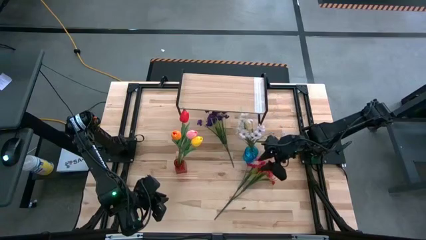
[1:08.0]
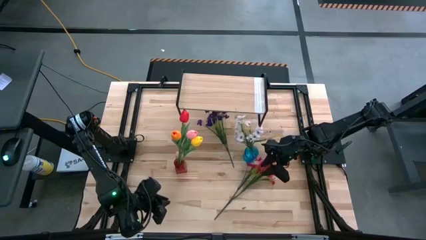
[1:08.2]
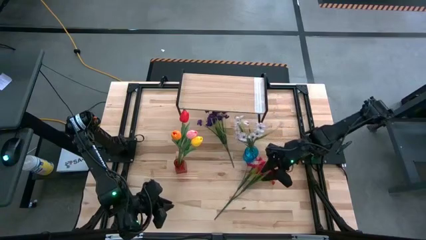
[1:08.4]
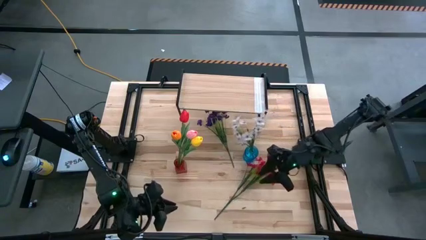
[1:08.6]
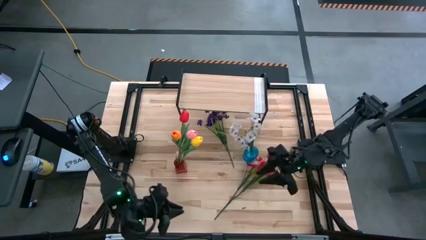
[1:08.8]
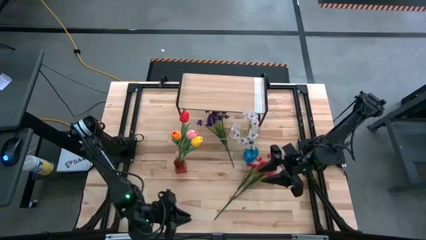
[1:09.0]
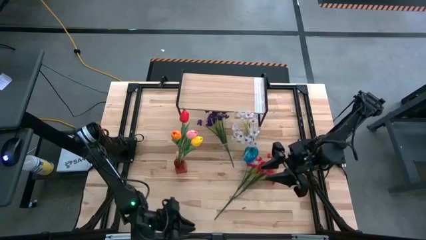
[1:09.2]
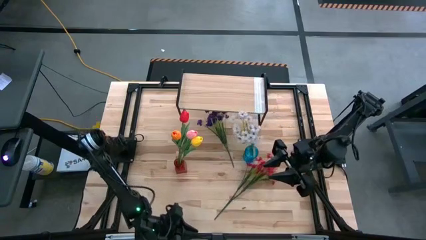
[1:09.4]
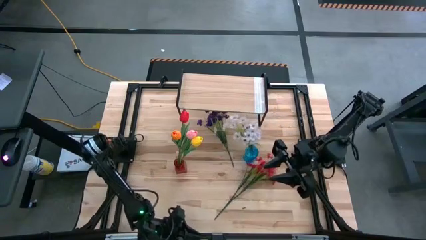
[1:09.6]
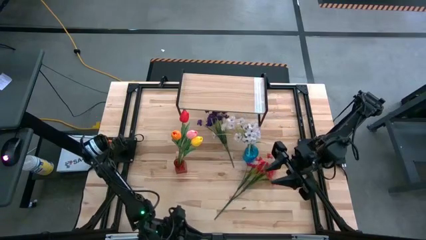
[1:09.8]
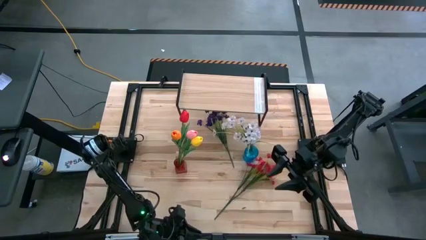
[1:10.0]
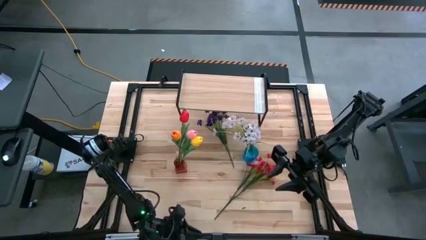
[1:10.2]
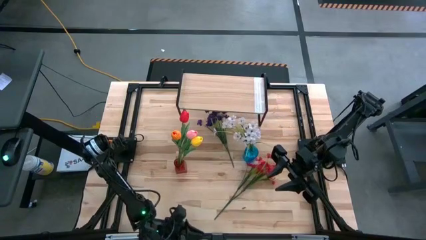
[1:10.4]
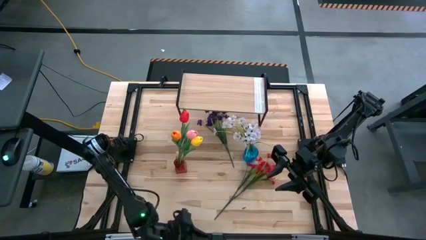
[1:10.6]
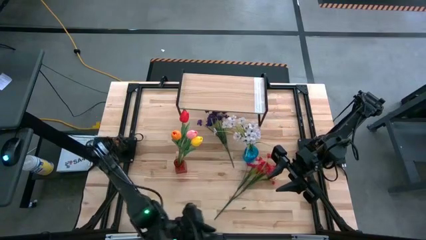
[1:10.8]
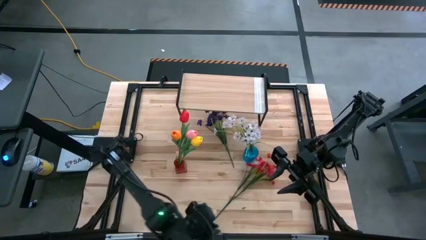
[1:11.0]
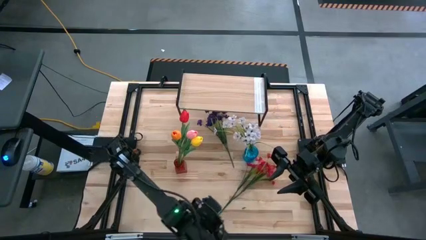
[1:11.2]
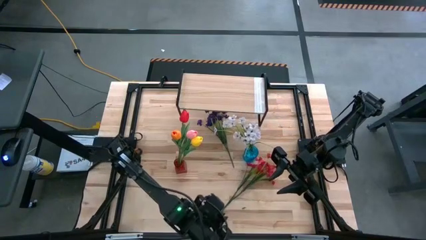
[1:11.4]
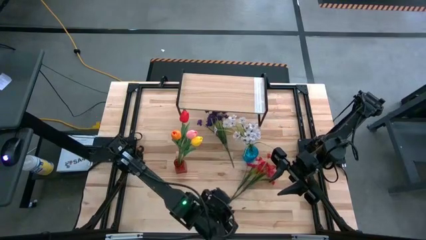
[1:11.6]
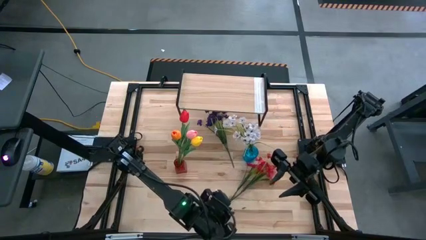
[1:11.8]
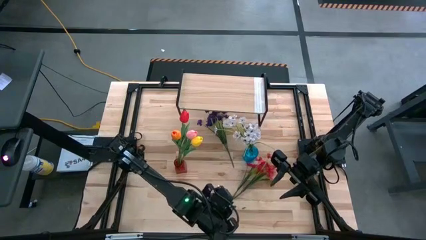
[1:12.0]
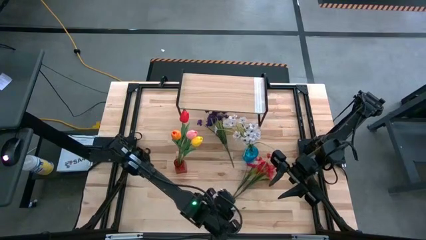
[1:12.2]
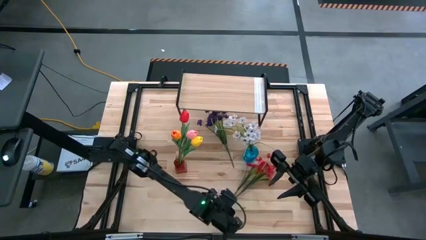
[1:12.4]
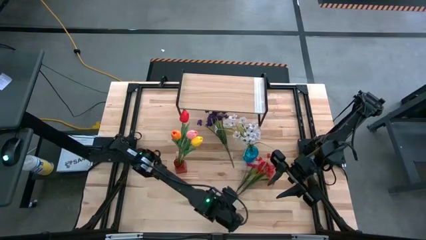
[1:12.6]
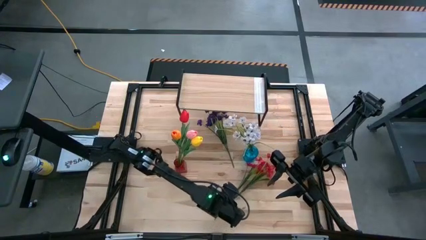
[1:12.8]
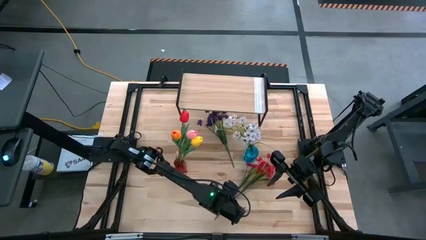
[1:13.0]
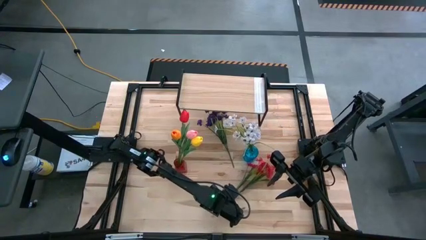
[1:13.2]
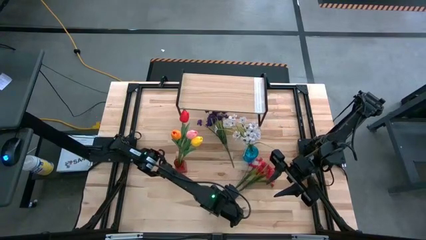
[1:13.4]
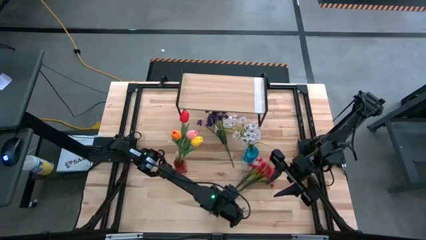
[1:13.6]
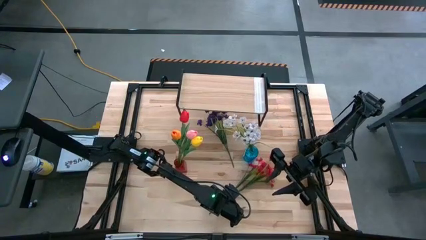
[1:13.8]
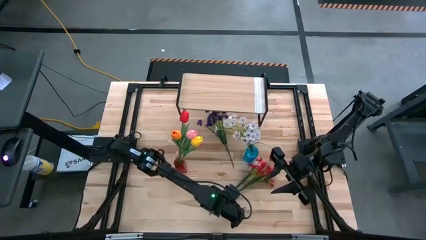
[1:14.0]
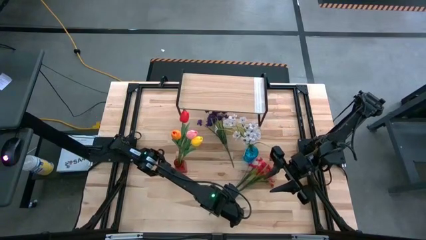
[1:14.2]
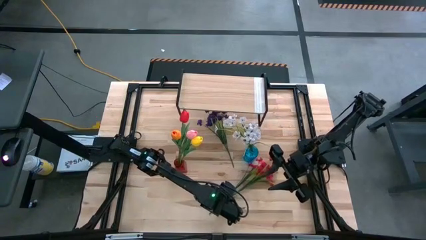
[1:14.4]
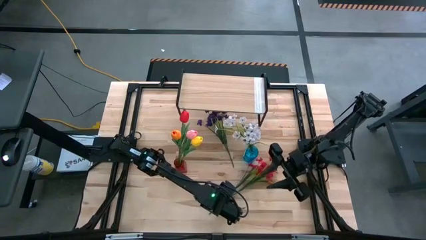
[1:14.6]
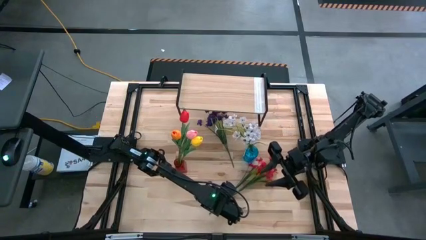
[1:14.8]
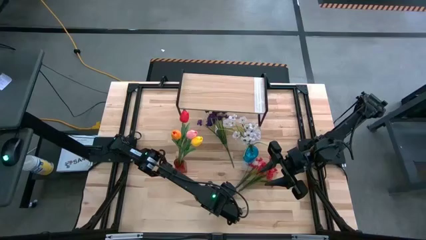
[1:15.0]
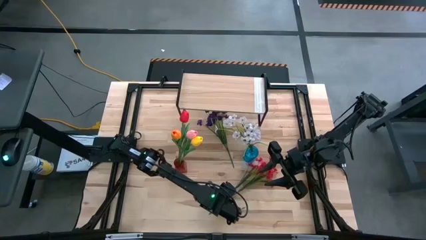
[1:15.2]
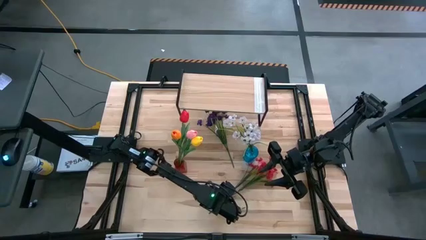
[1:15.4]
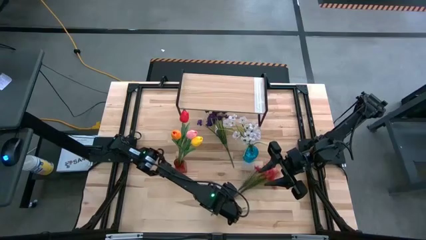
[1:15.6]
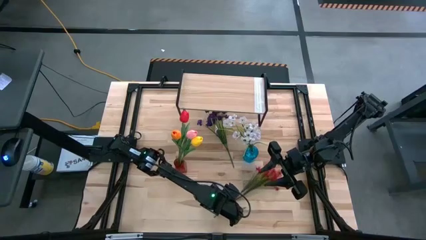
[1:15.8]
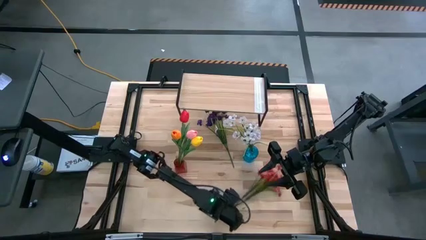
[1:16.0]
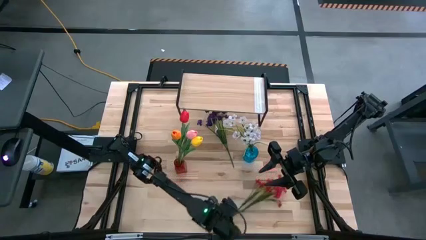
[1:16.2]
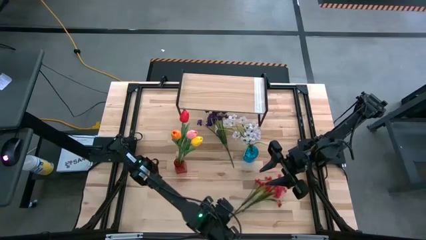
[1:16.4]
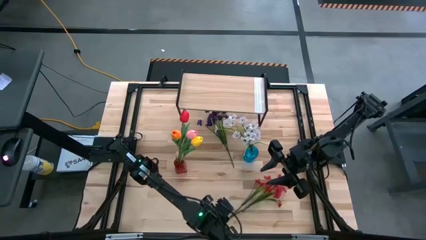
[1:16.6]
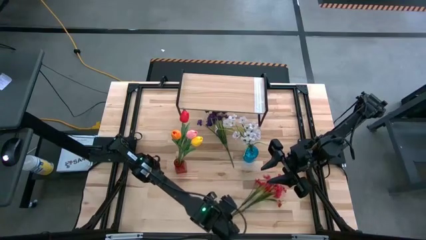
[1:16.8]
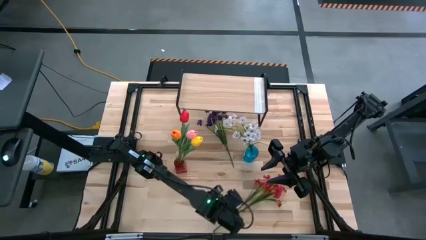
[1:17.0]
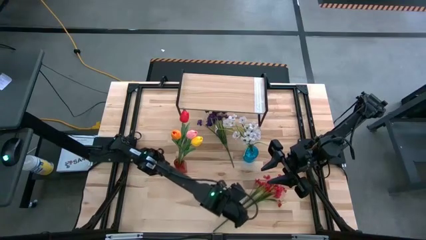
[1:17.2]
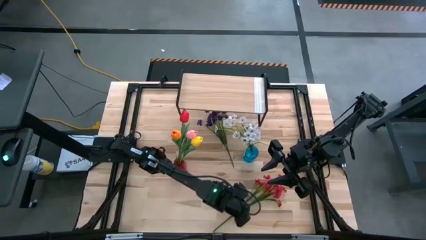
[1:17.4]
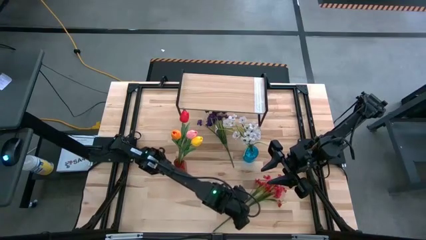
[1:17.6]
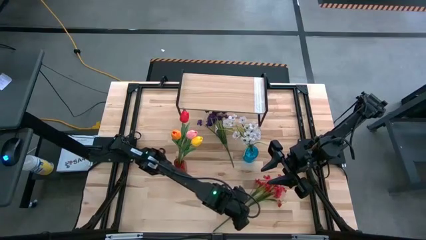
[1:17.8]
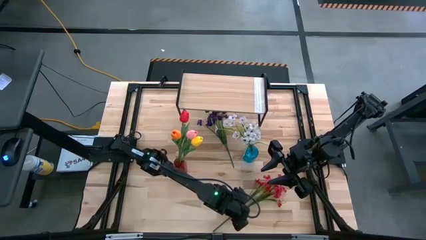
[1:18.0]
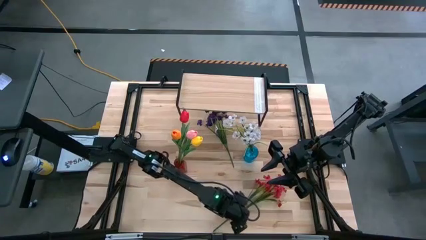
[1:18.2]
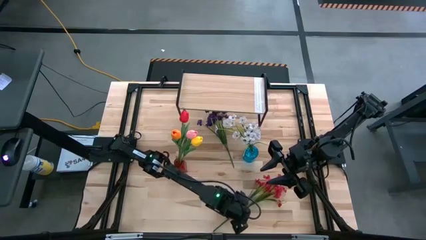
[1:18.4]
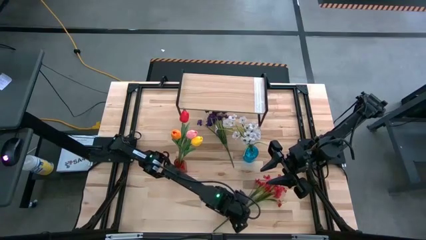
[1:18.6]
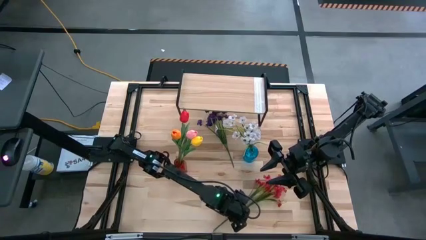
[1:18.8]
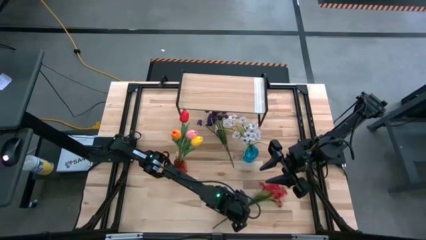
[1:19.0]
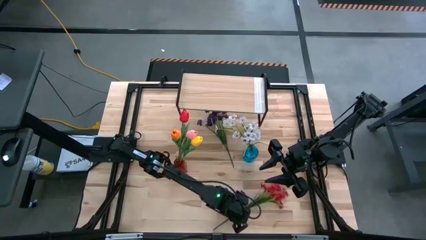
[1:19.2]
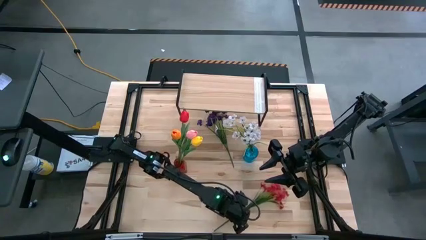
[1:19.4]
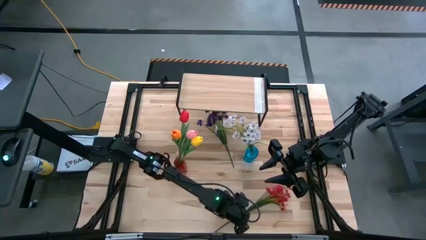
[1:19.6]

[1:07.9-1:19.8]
Task: Pick and place flowers into a vace then onto a shelf
Put the red flowers into the blue vase

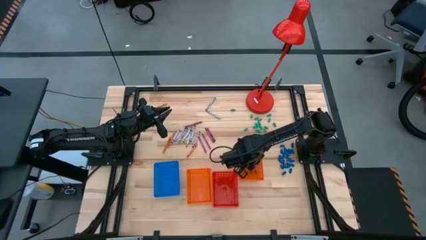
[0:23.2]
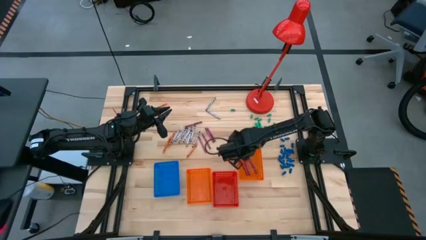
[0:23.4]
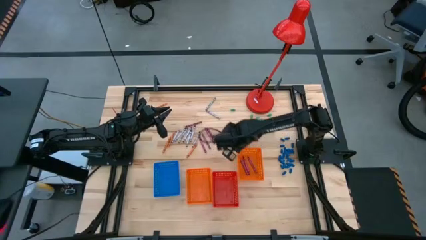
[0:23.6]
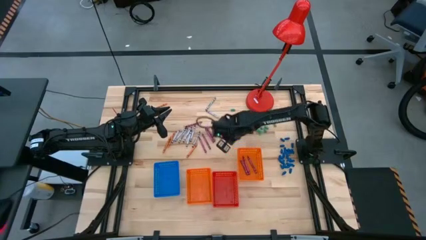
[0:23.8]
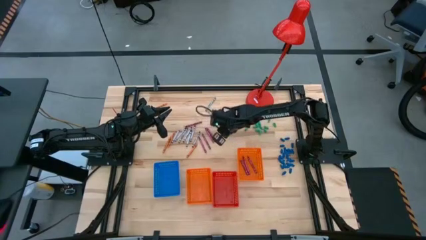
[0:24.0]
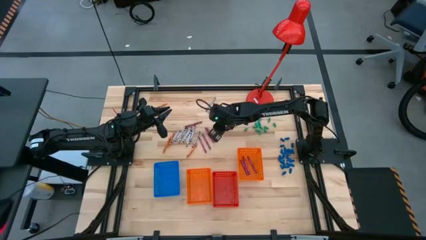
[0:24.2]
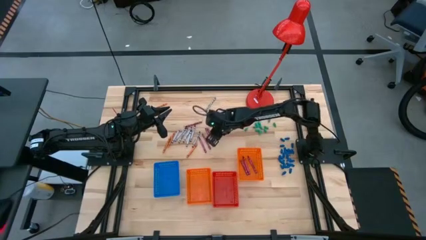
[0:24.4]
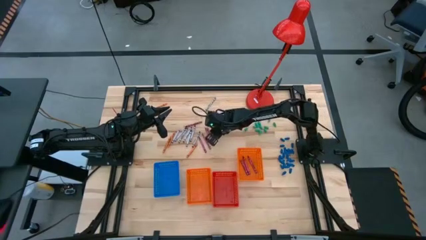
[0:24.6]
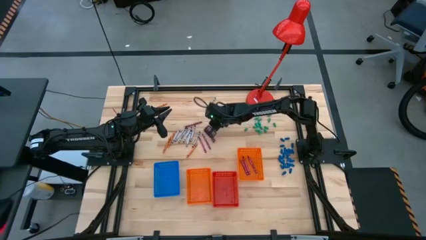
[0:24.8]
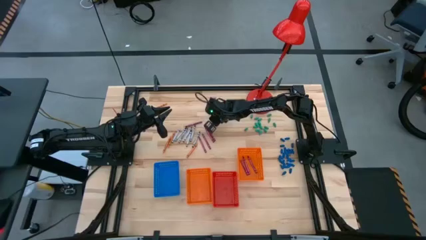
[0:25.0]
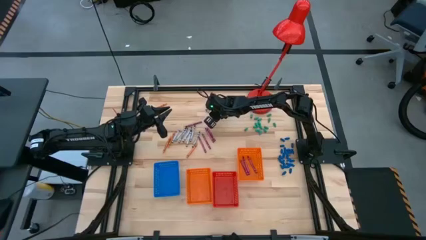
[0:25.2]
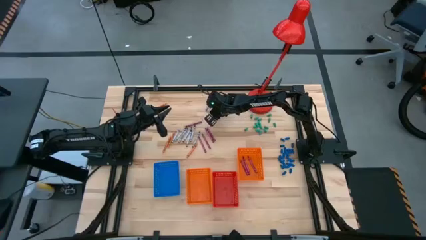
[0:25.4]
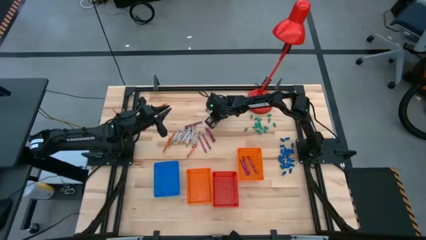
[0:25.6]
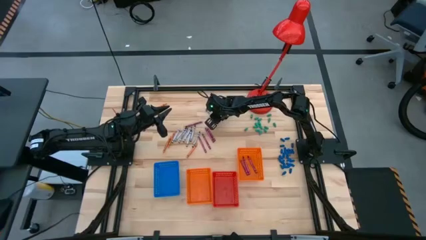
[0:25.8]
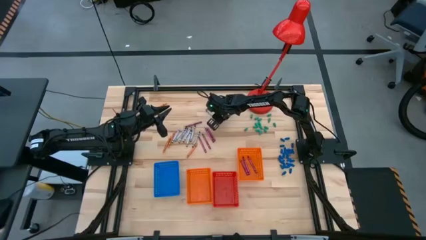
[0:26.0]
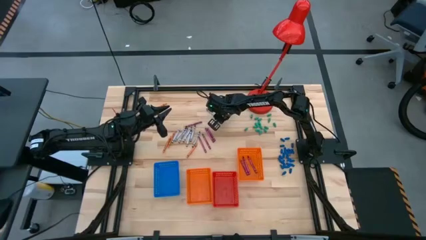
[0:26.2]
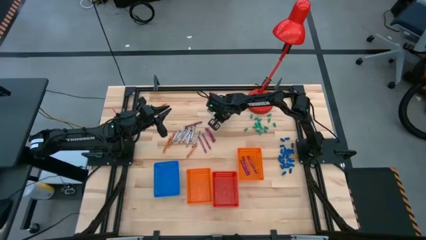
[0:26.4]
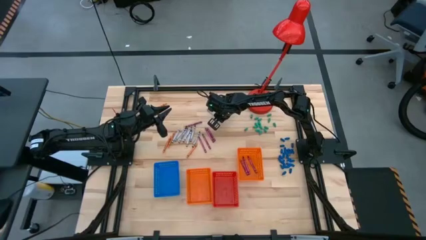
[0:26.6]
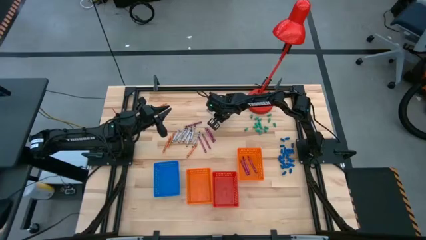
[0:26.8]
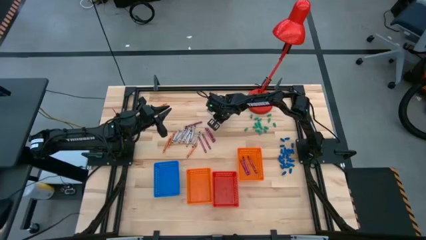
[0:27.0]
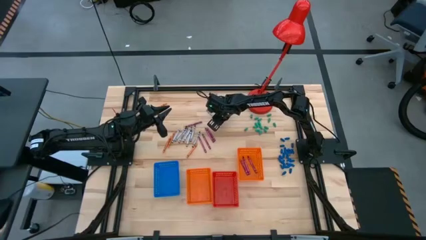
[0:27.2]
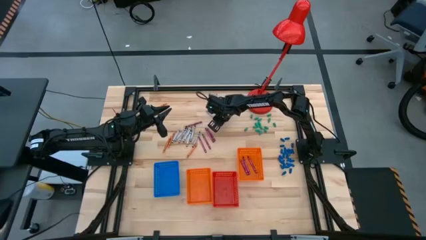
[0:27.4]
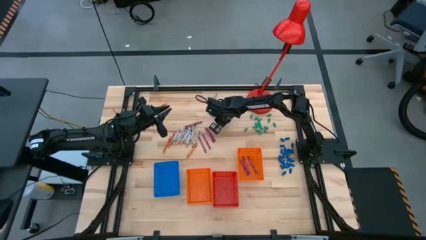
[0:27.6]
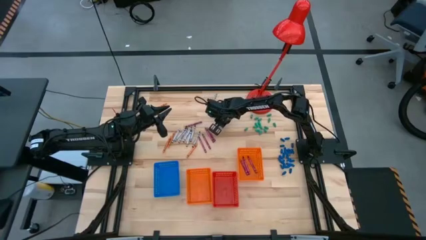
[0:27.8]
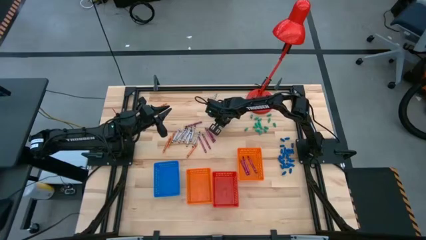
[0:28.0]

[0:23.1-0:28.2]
Task: Sort crayons
Put the gray crayon into the red bin
